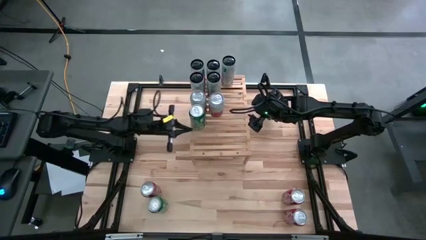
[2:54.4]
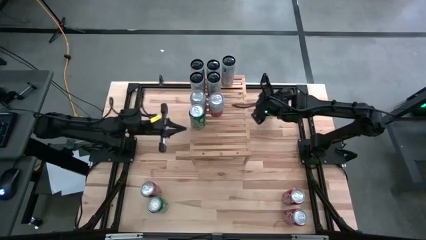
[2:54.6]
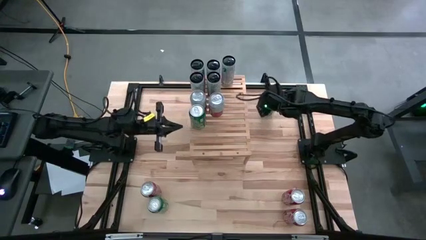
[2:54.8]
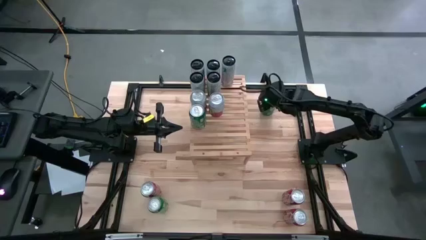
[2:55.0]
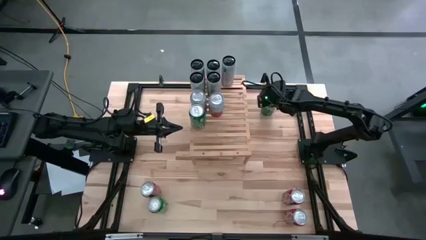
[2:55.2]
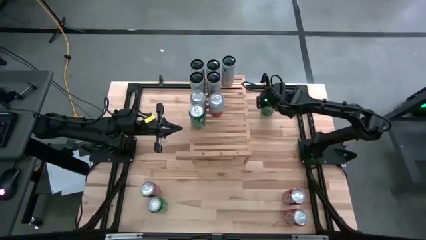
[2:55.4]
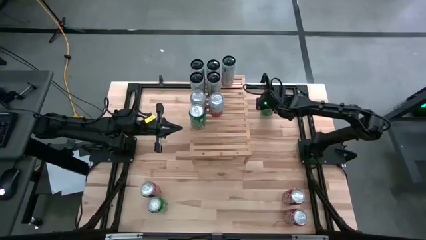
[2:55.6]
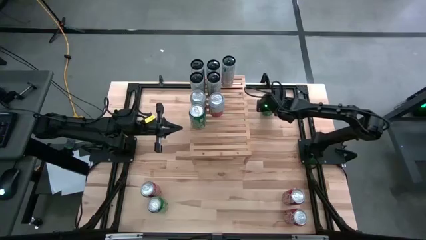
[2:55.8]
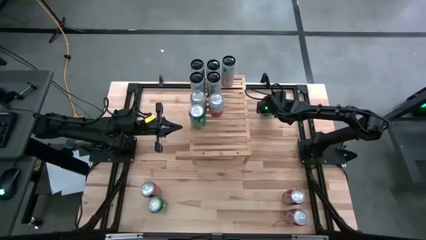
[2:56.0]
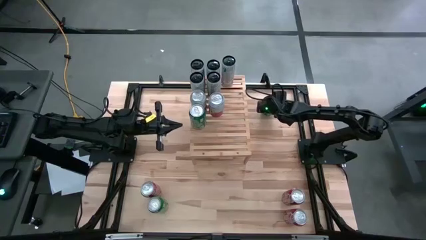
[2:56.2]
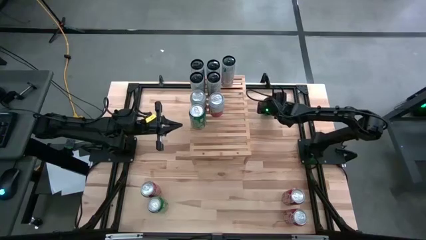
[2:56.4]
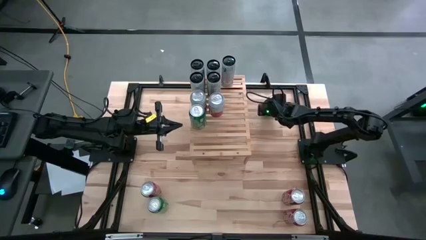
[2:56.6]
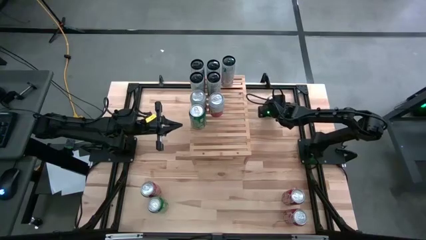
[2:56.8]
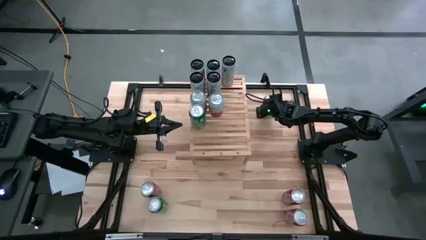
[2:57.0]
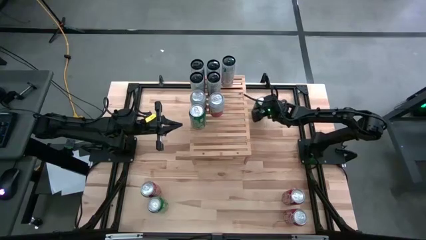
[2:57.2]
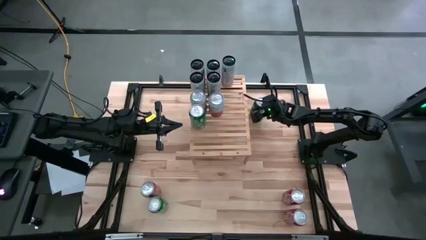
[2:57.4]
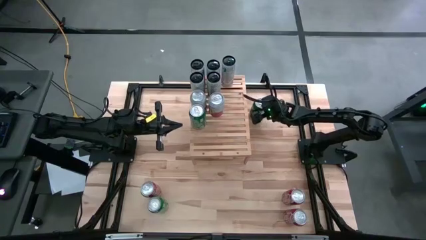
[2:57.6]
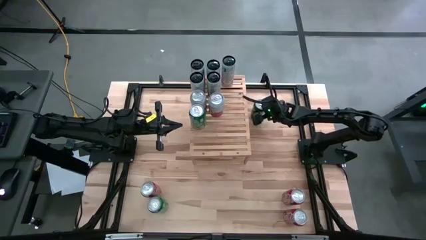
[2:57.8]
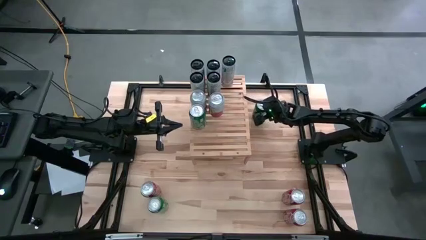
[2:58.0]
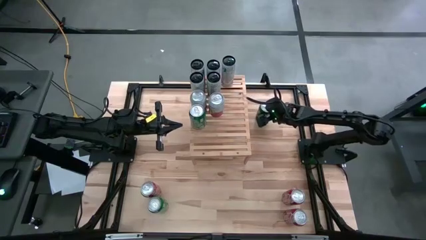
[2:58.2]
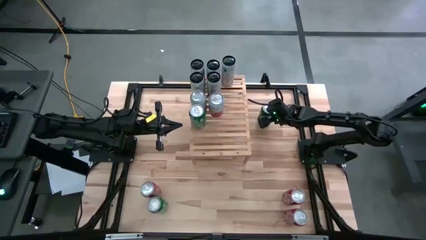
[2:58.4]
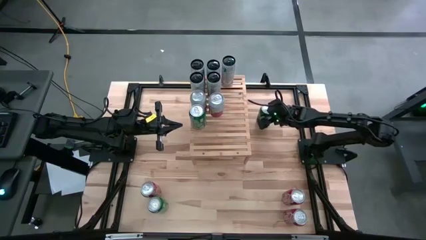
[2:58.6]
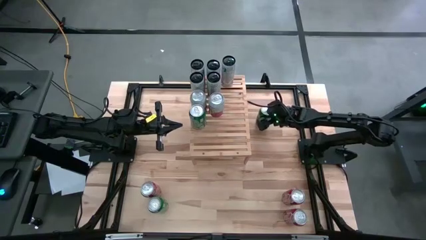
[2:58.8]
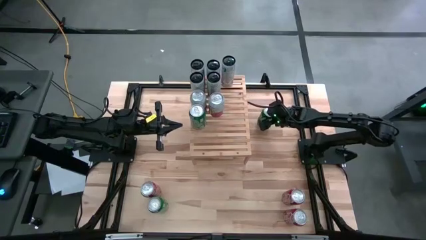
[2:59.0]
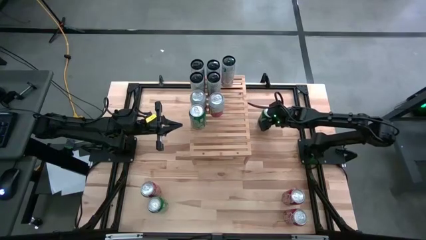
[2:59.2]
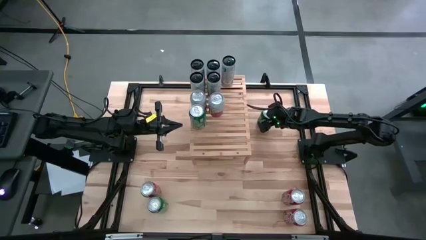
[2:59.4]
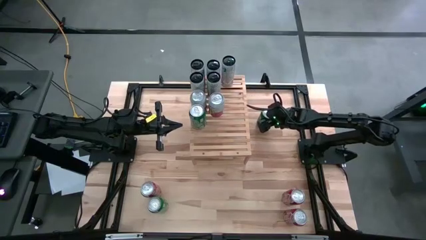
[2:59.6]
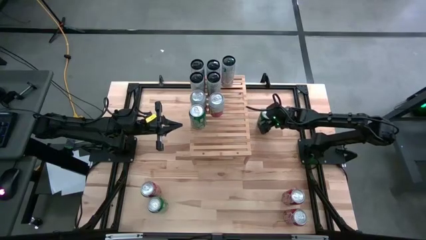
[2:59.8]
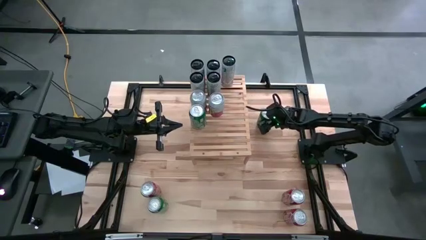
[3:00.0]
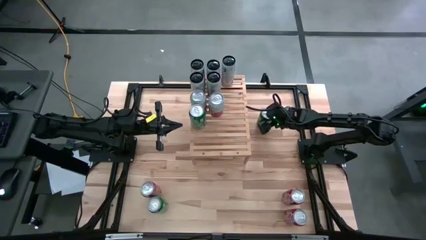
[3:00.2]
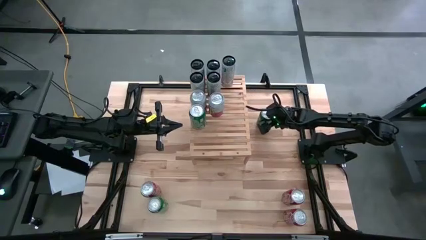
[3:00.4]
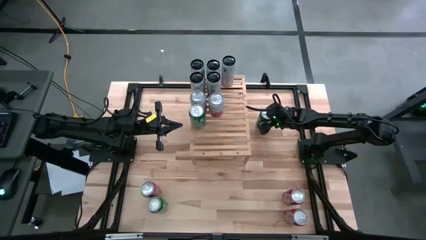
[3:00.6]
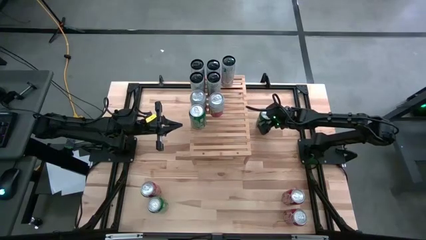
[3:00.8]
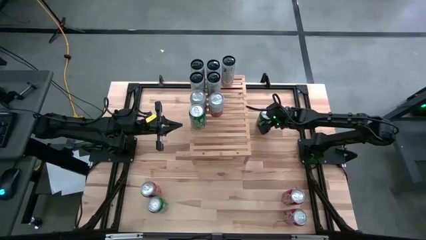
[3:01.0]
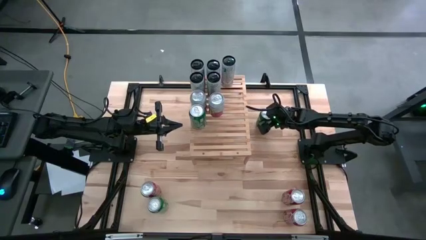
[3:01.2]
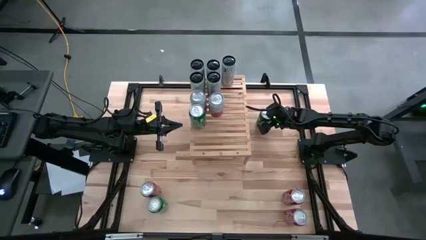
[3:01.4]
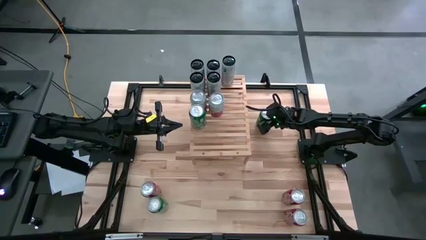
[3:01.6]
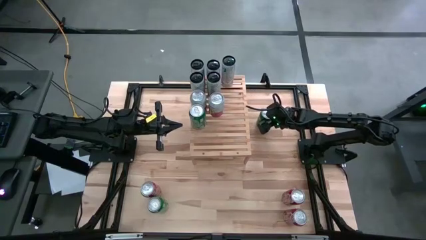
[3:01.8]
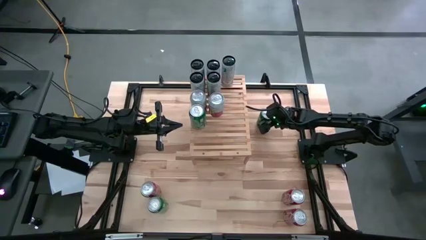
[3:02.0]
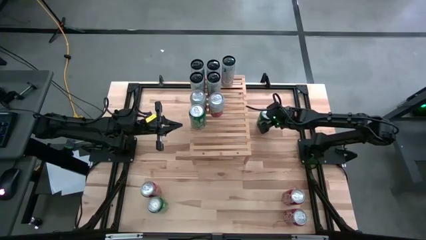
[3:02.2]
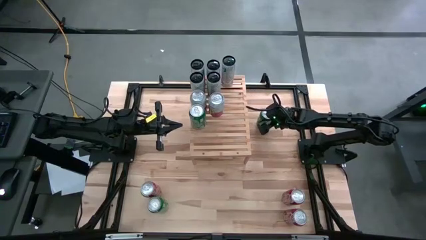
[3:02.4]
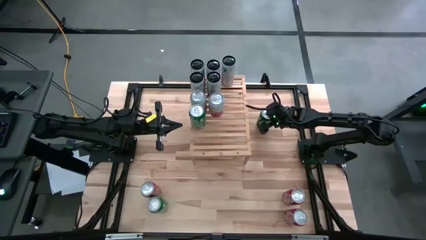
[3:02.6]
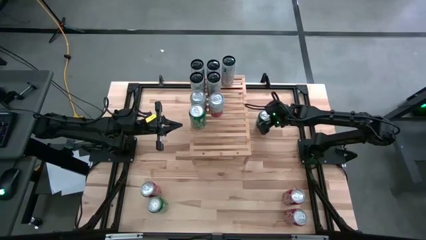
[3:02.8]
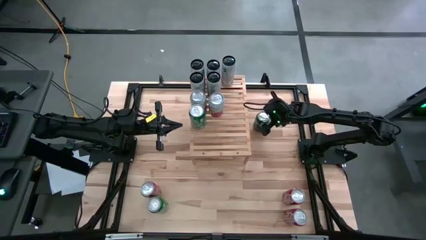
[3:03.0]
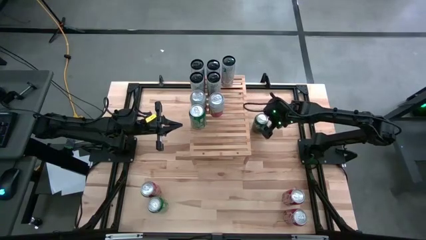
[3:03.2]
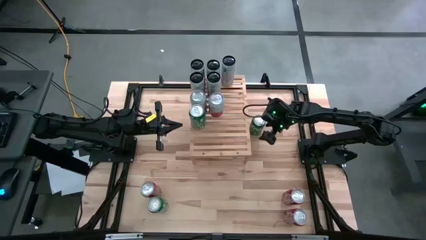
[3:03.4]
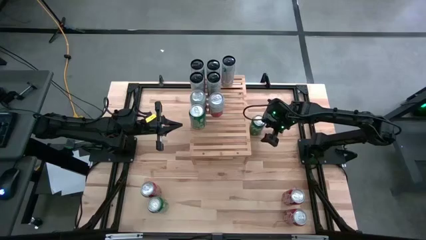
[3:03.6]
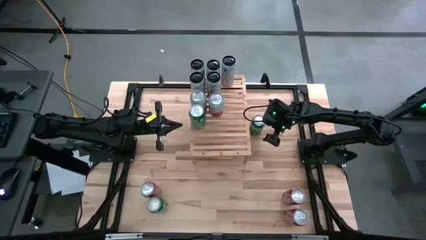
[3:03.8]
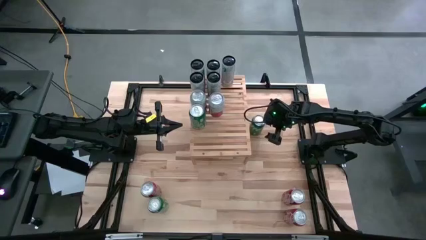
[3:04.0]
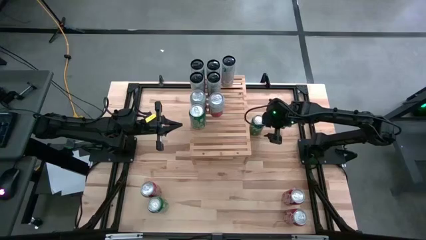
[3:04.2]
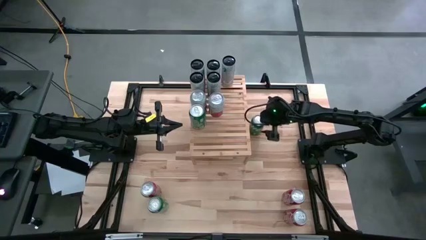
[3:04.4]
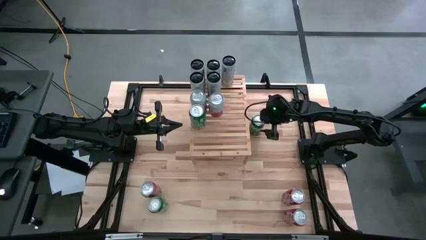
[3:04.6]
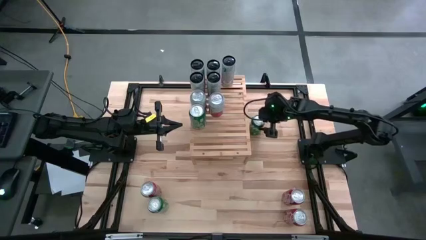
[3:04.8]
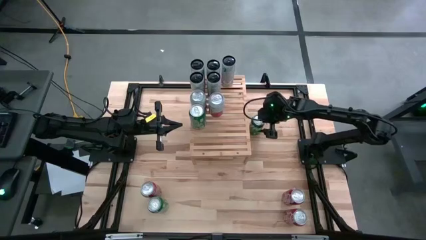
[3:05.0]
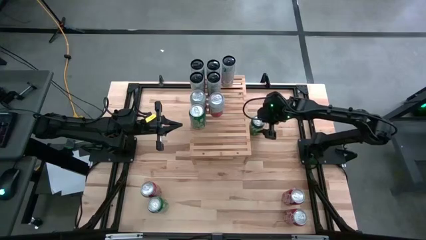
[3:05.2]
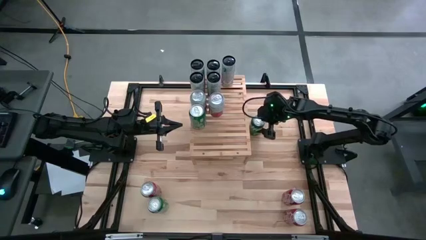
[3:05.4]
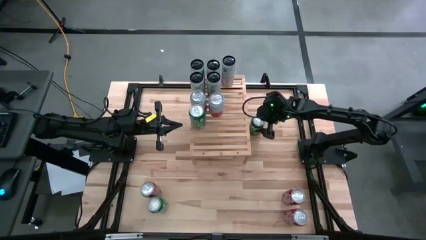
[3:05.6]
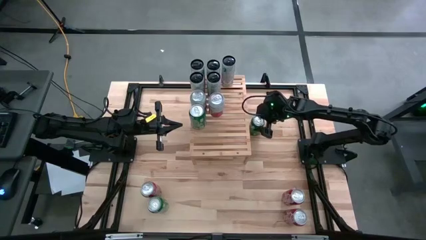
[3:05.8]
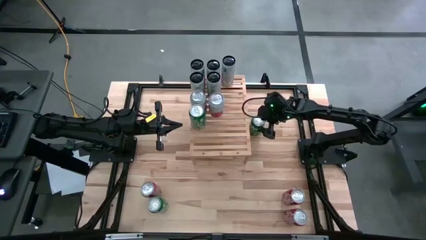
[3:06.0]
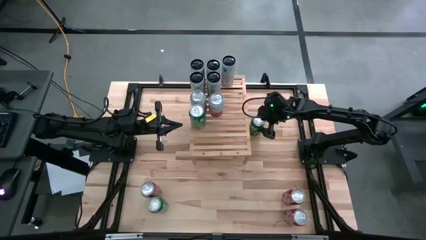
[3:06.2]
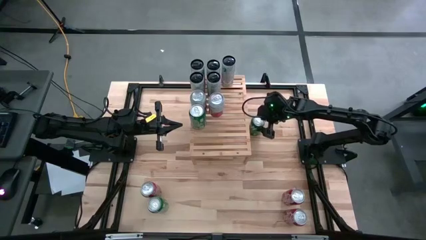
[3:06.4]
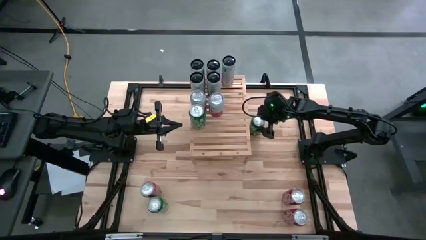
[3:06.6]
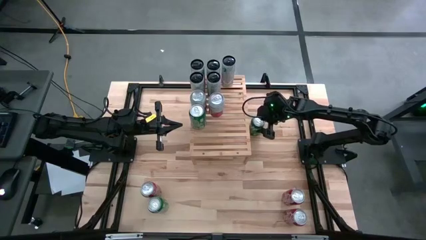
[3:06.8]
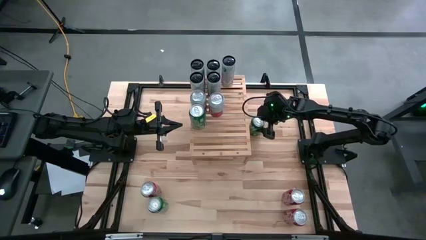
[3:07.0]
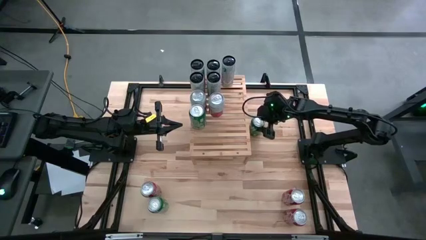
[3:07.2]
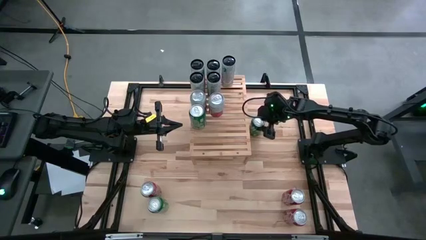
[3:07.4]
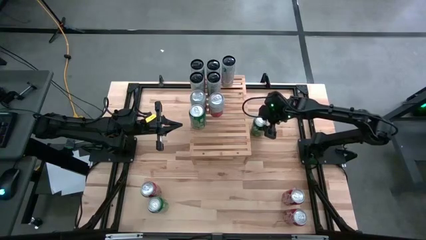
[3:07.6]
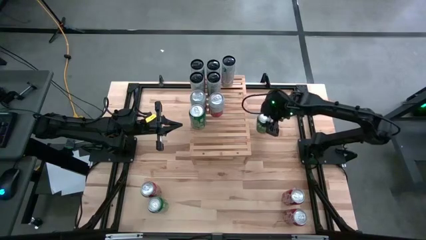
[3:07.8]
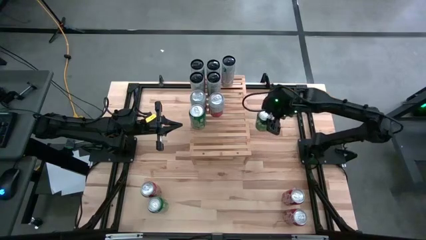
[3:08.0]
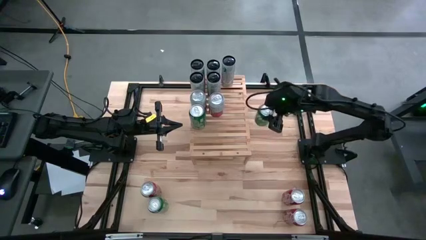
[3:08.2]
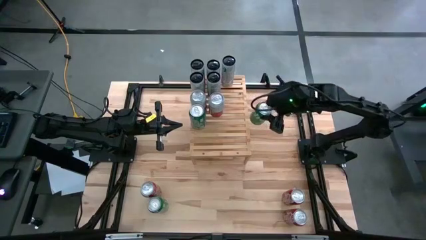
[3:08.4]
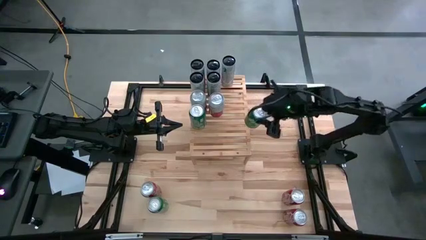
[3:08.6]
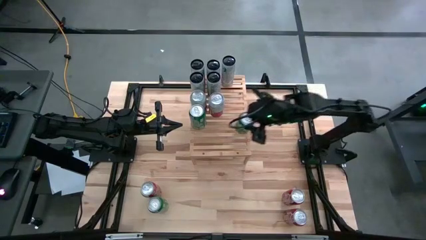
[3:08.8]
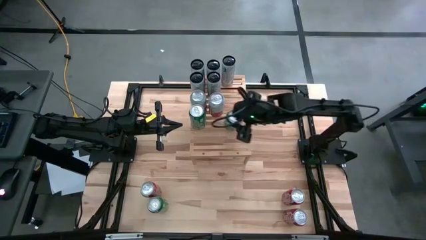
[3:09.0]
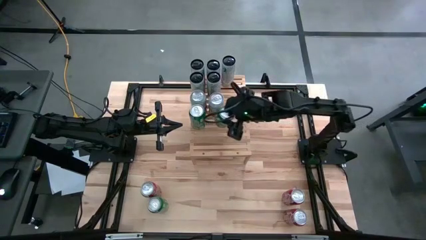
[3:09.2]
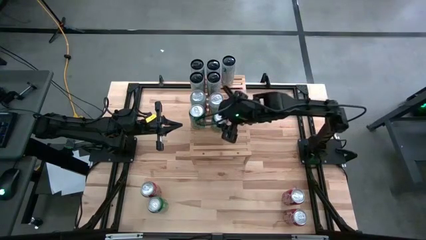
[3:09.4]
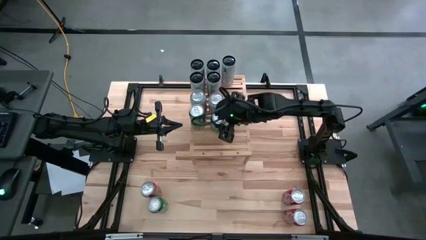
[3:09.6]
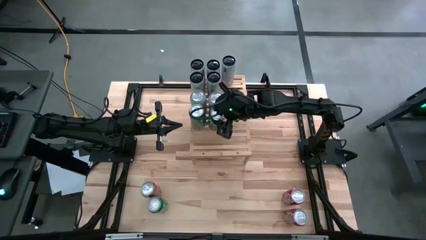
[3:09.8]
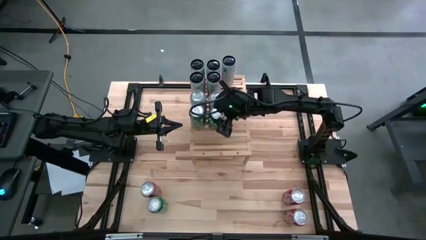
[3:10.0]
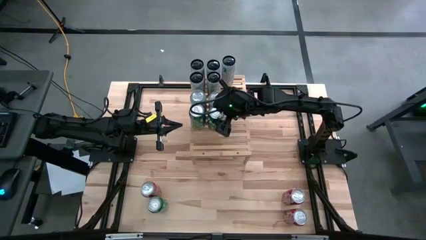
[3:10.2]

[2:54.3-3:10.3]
Task: Place canned beverage on shelf
Put the top green soda can aligned with the other green soda can on the shelf
